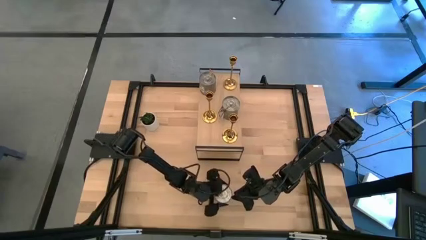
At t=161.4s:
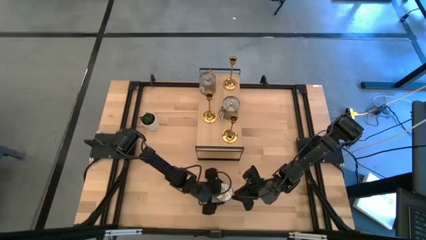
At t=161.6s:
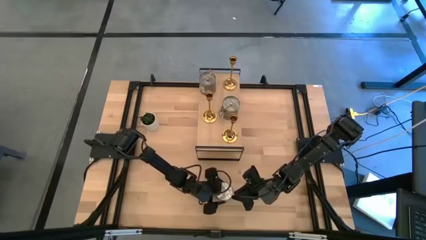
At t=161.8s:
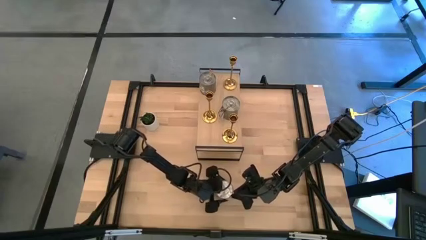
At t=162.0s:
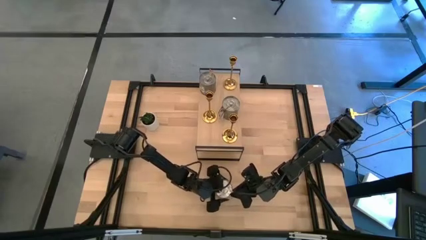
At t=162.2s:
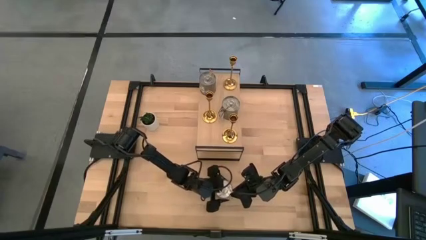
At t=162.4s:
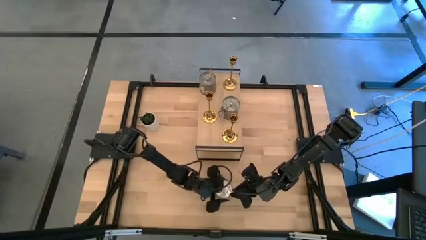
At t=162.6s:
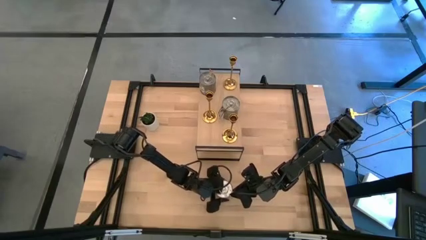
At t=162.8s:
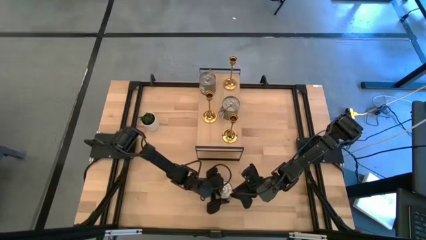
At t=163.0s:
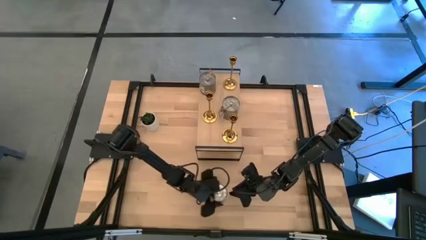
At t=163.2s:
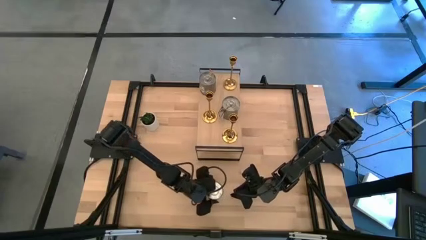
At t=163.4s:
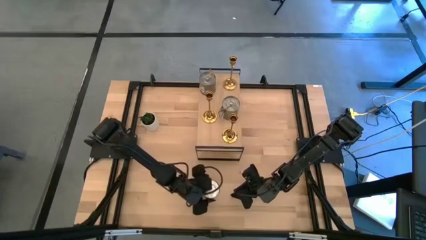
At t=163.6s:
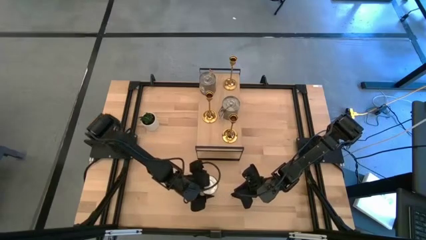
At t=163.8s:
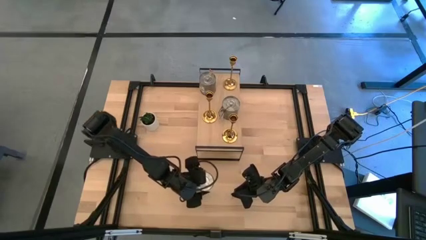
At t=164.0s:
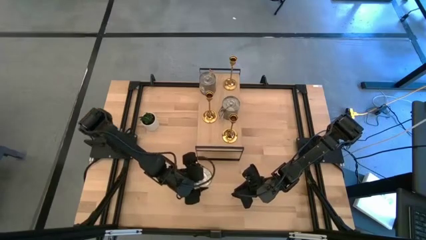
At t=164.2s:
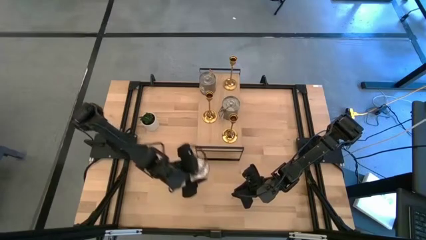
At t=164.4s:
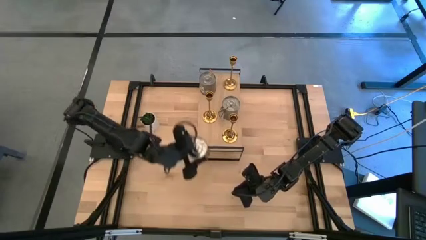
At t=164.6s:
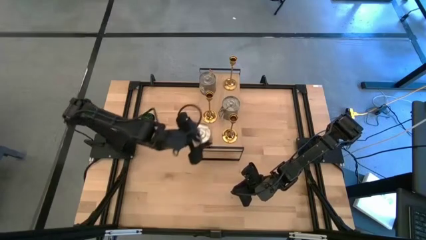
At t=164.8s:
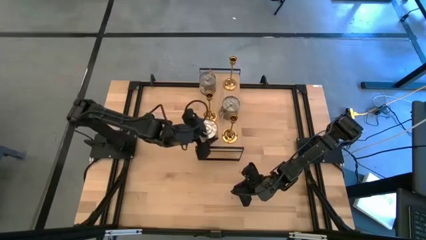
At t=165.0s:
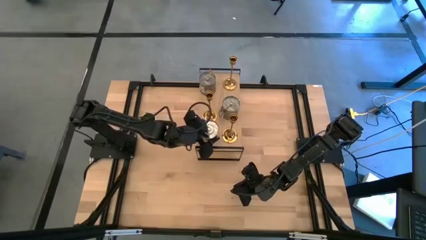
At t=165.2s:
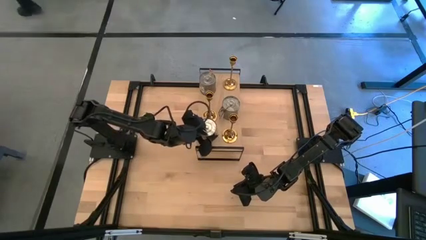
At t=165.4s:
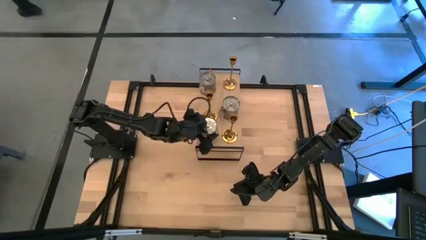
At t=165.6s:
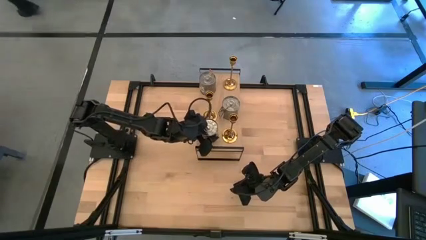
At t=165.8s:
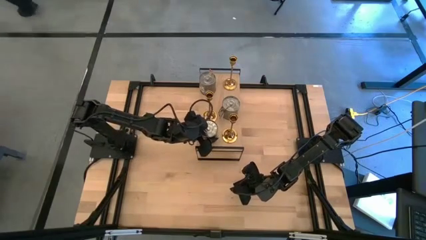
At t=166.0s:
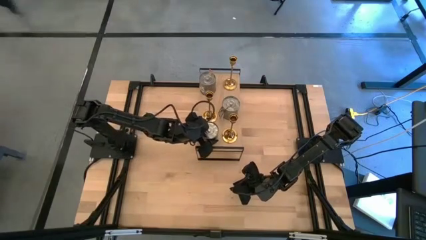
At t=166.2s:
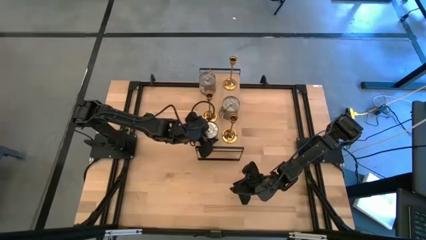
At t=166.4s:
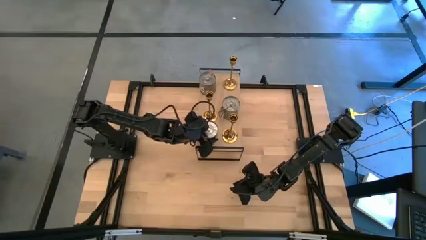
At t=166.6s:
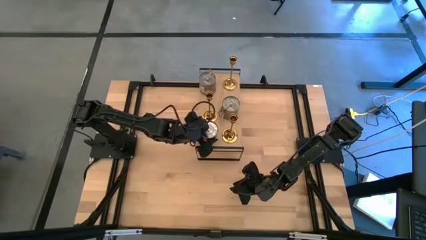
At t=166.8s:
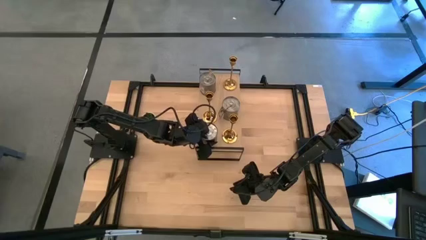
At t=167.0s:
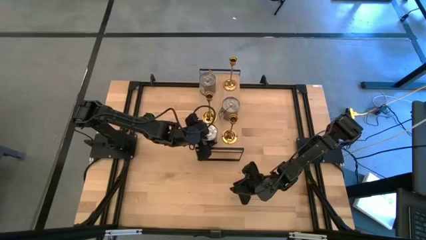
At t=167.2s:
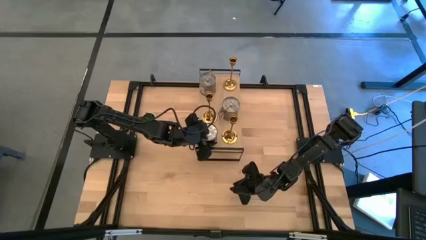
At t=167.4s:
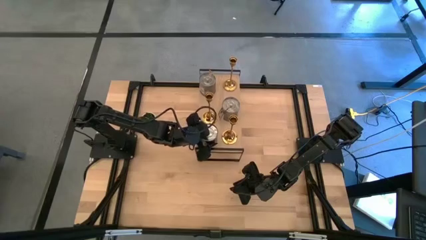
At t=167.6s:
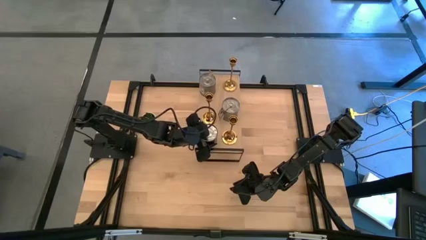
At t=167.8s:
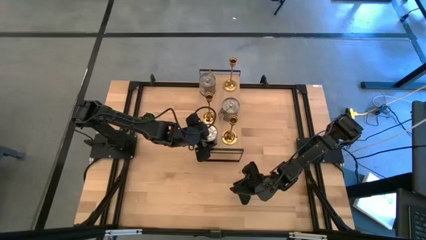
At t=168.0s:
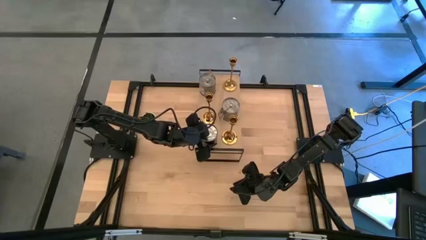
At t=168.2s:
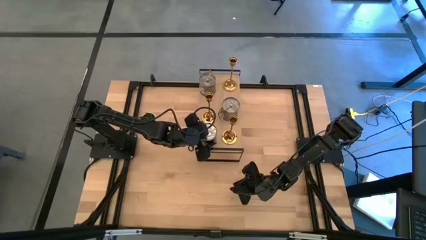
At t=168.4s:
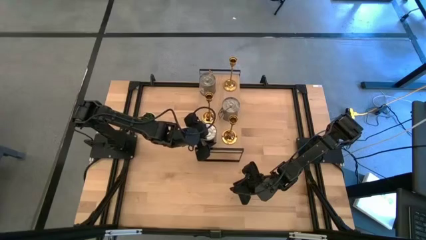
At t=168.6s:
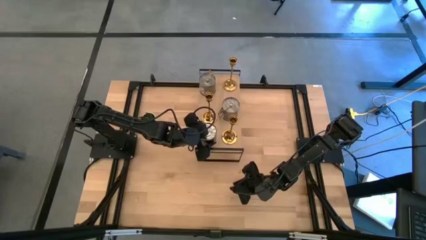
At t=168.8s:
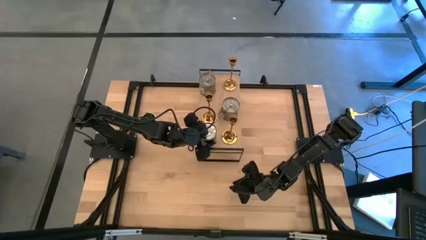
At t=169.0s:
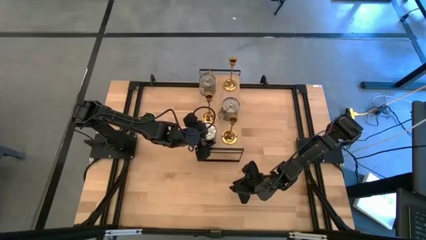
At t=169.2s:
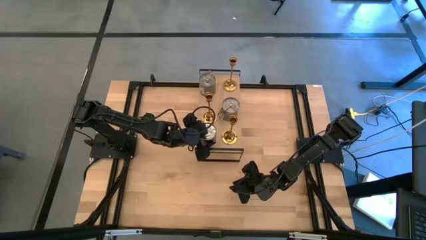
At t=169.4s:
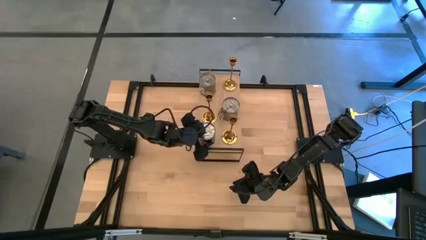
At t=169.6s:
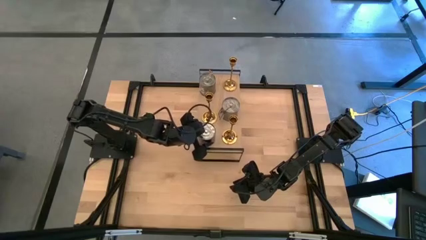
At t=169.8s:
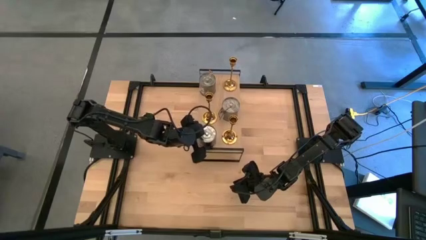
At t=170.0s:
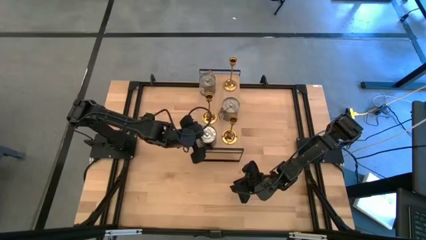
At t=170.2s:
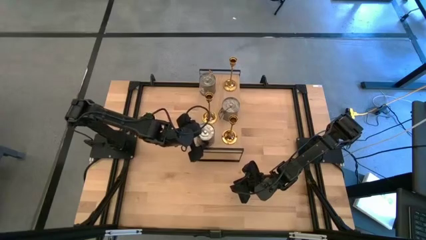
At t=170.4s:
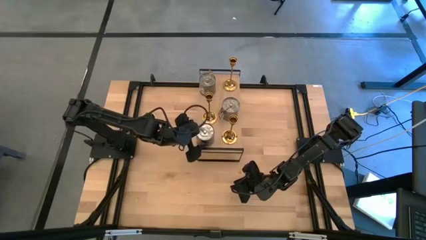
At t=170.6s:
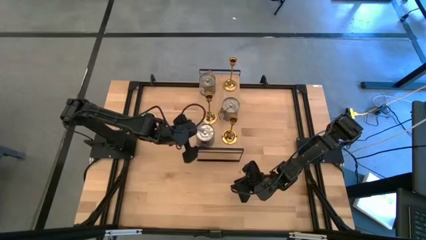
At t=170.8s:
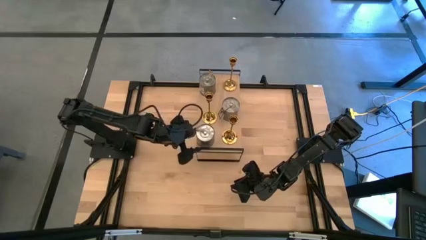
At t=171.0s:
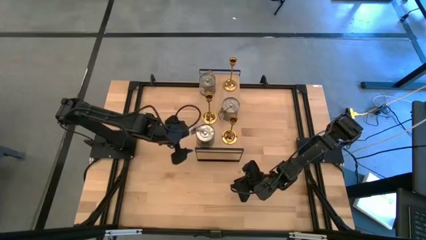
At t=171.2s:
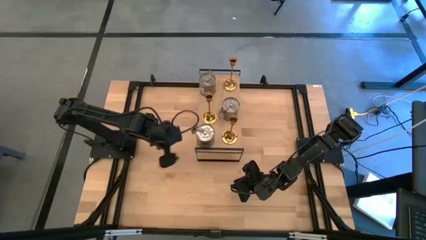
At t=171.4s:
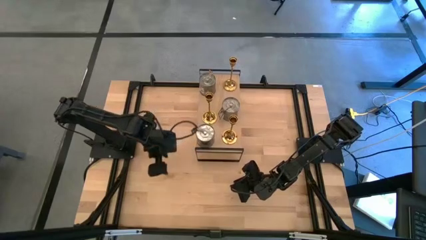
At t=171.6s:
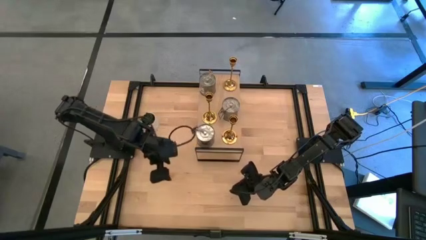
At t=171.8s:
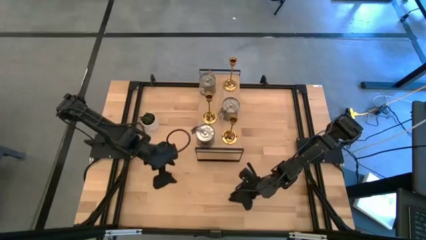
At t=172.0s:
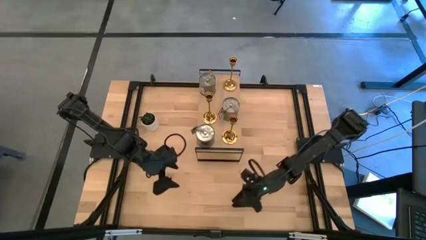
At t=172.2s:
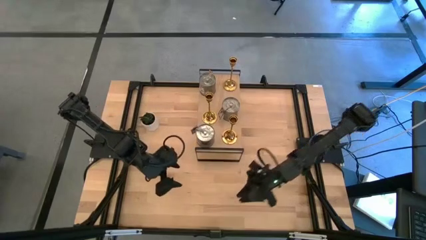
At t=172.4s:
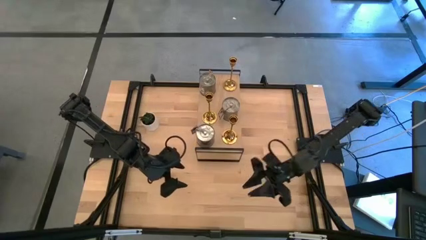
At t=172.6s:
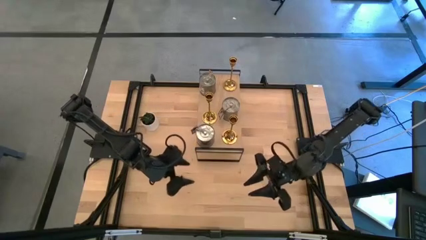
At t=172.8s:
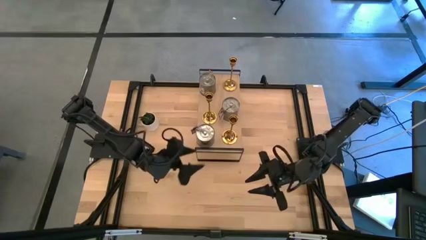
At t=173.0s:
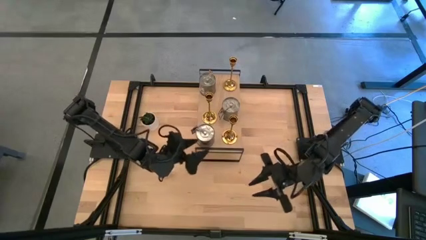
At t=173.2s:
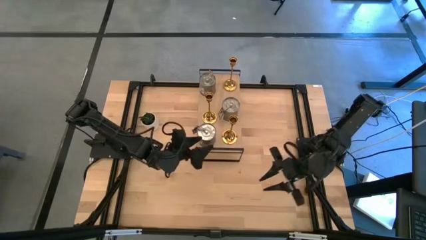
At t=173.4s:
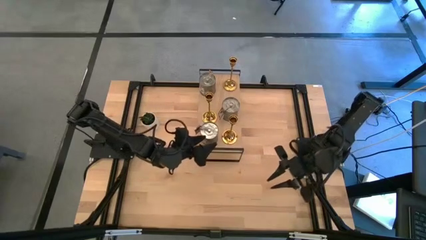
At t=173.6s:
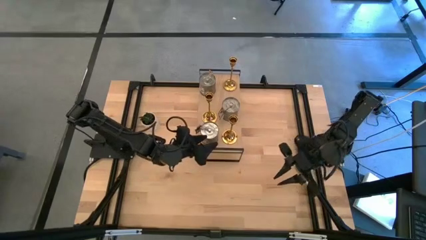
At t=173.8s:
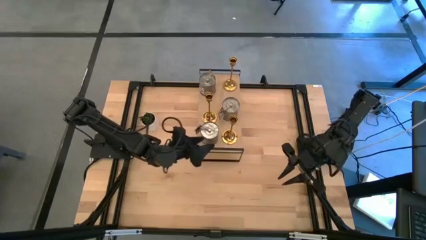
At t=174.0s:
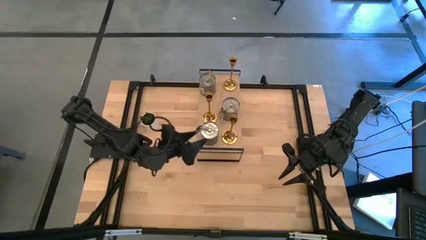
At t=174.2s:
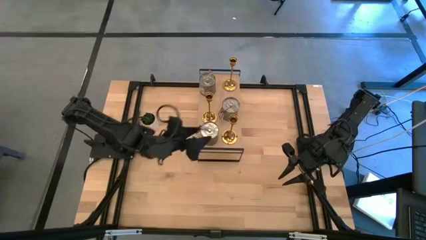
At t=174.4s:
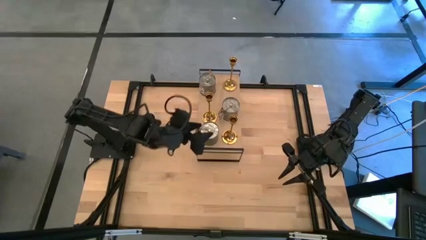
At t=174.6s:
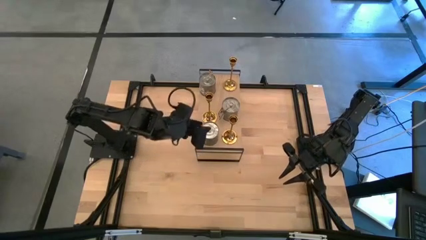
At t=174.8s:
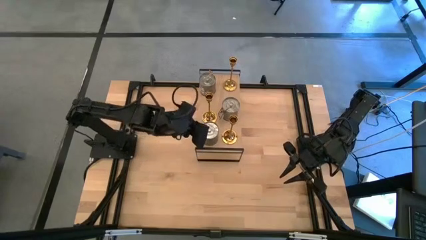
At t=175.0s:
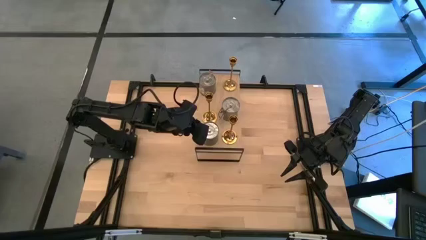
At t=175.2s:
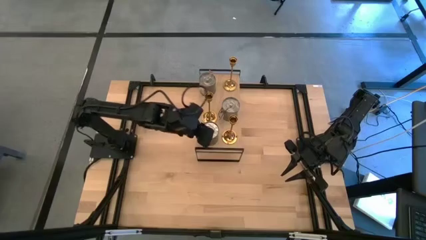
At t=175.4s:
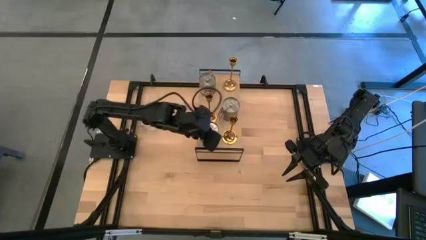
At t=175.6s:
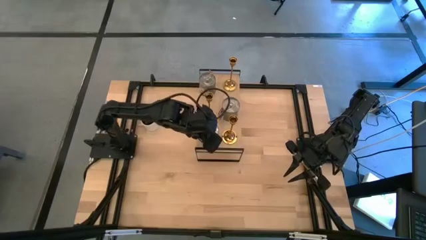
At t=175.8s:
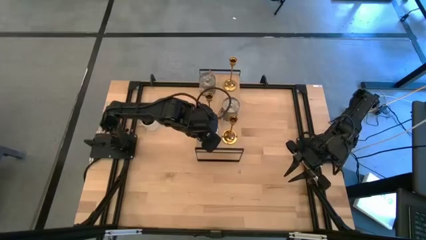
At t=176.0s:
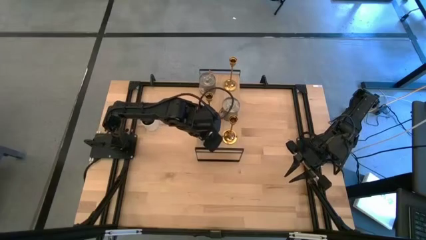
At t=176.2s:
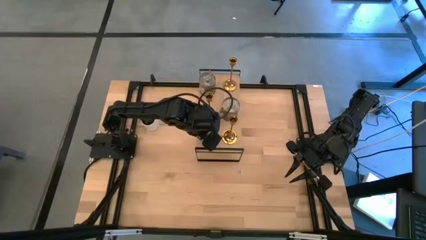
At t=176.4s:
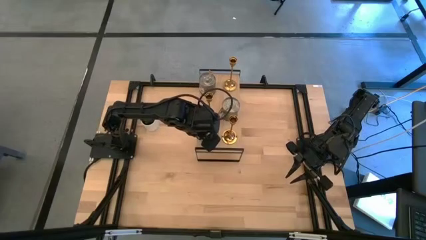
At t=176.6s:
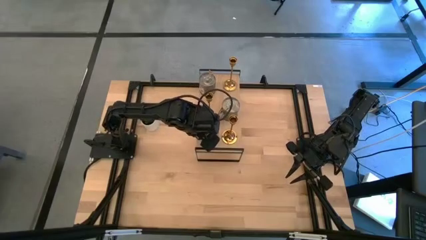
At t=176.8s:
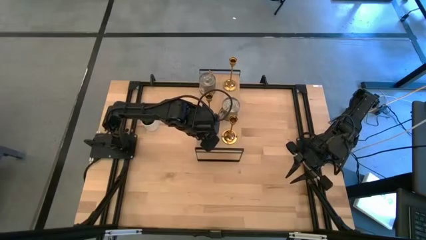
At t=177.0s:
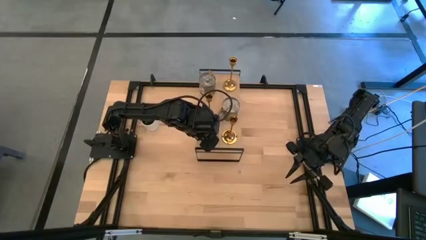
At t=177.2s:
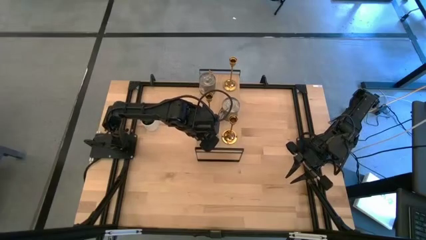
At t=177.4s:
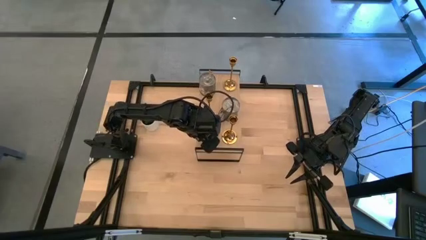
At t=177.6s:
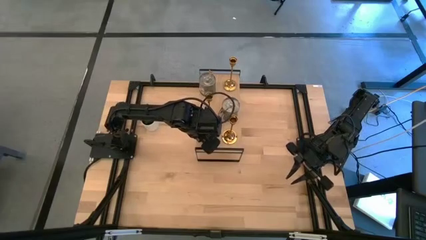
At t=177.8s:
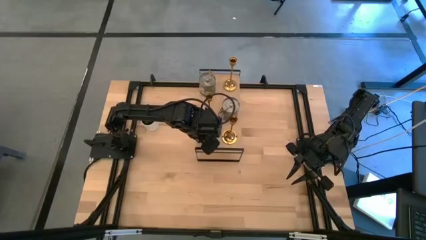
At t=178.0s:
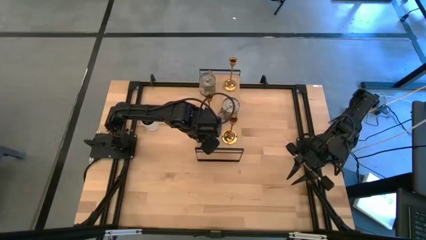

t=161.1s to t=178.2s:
Task: Pick & Place candle stick holders
Put the silver scented candle on the shelf
